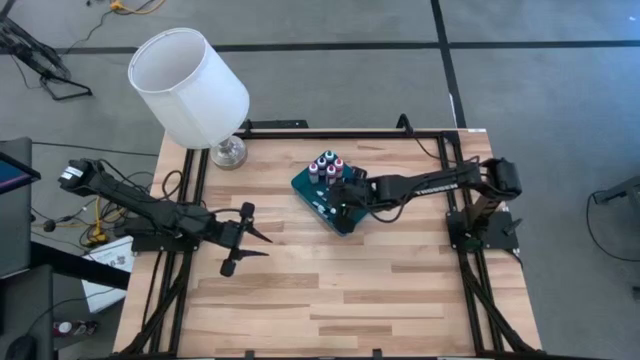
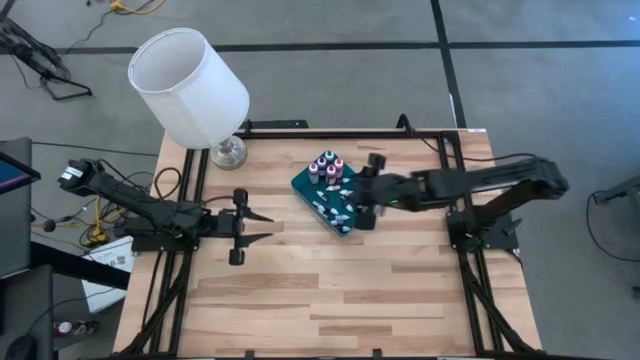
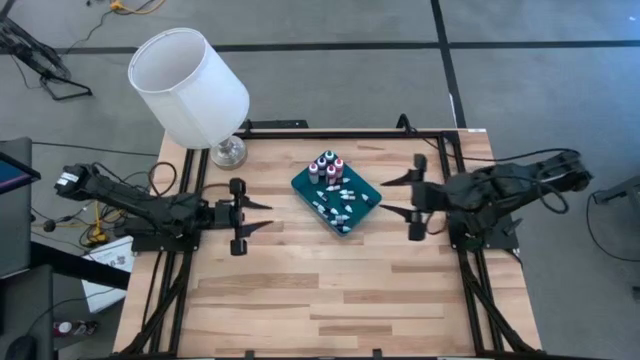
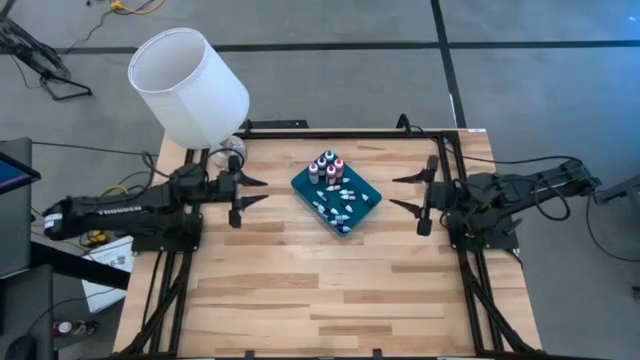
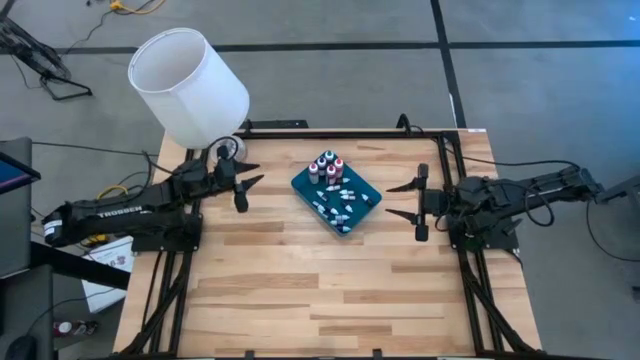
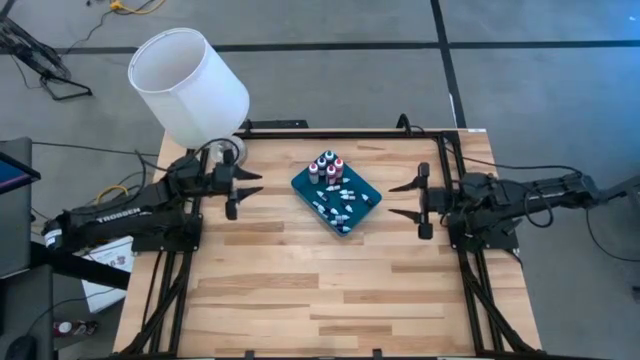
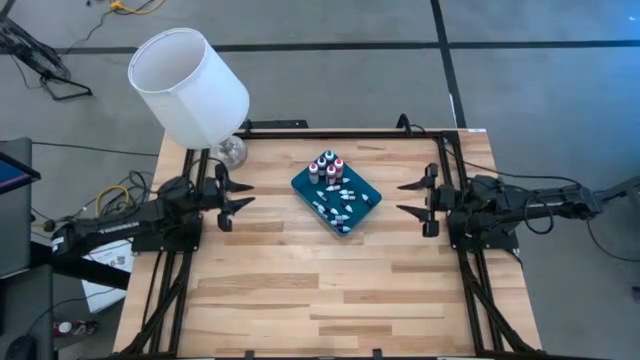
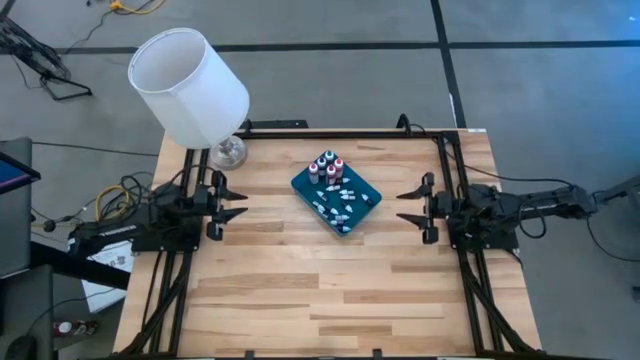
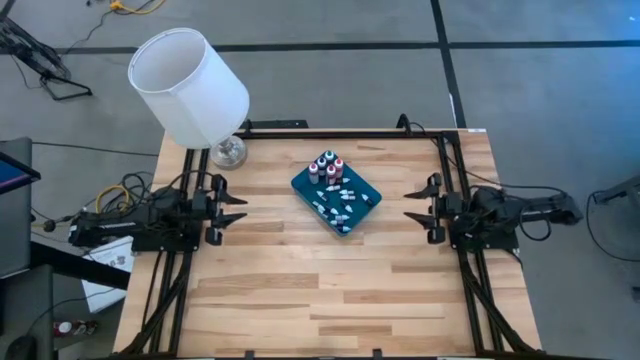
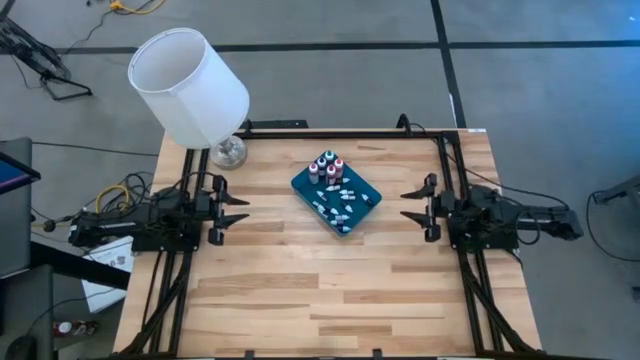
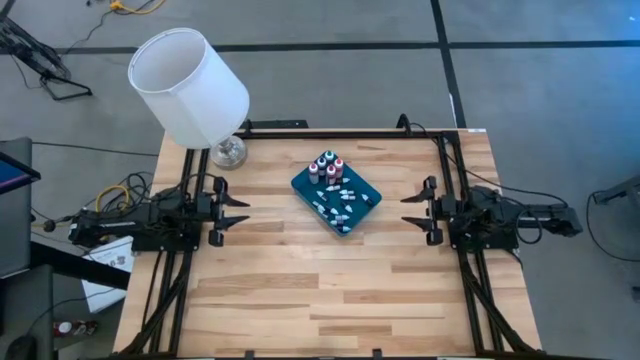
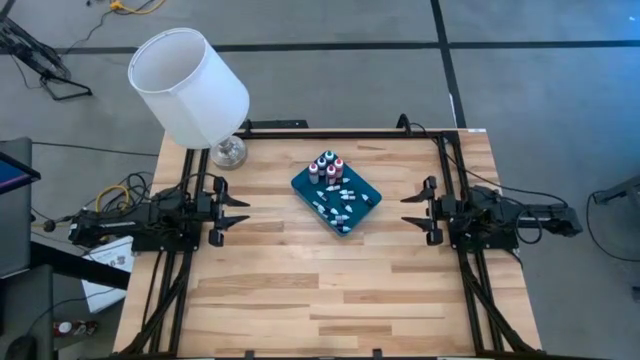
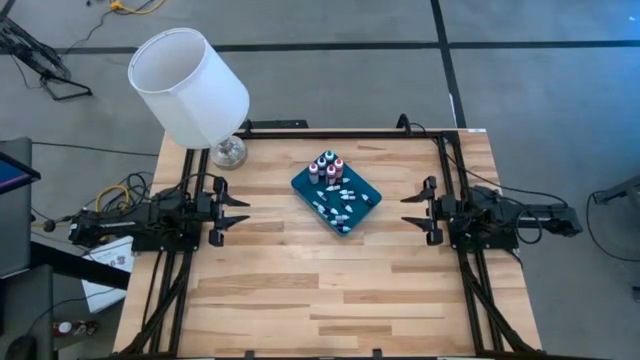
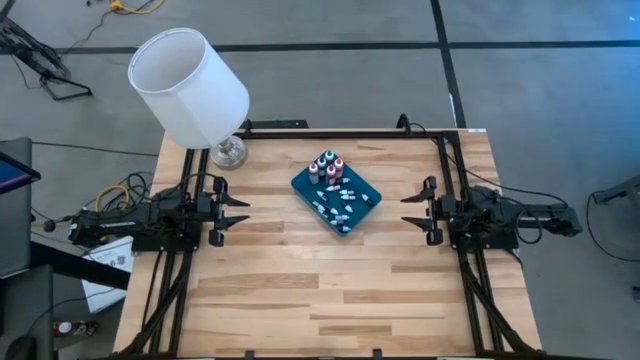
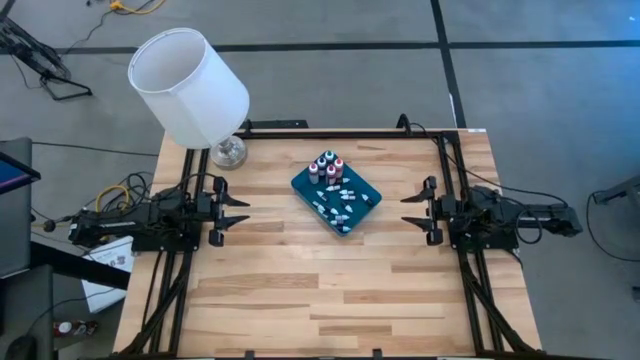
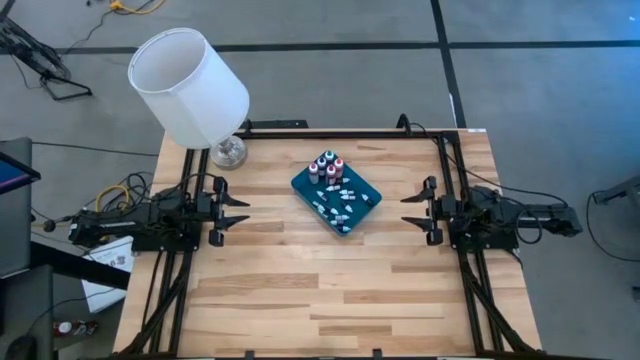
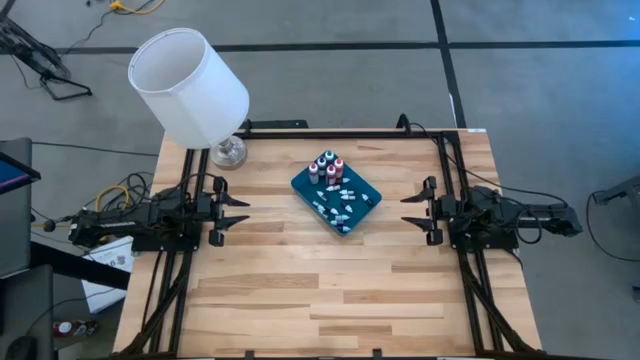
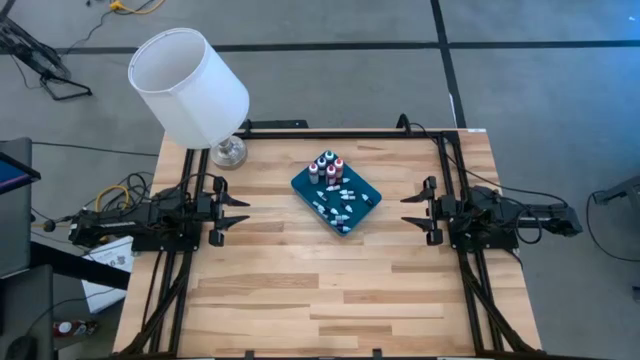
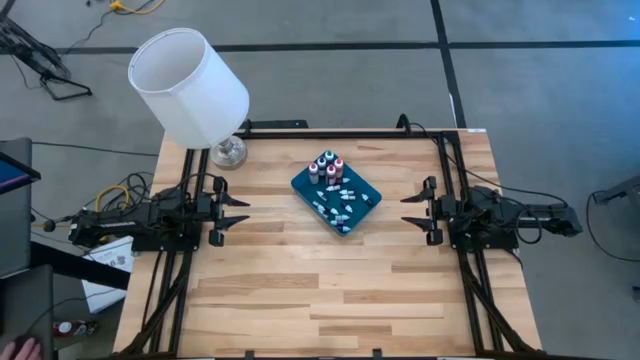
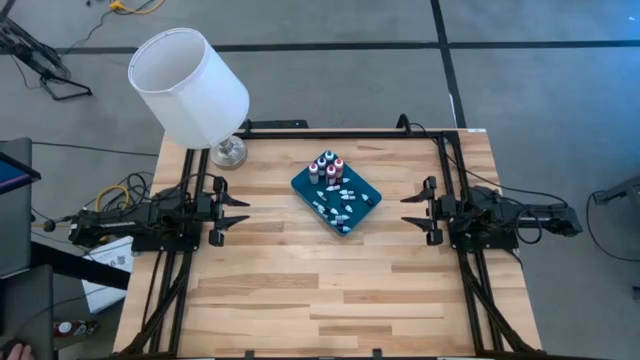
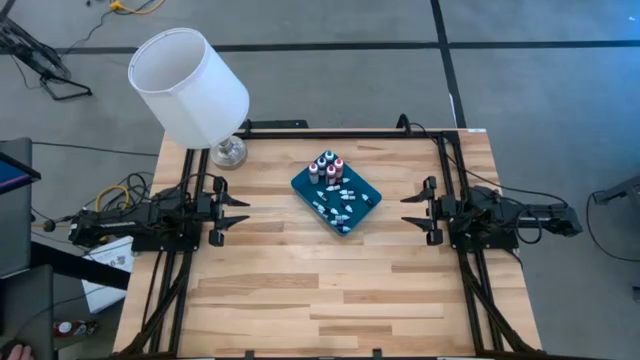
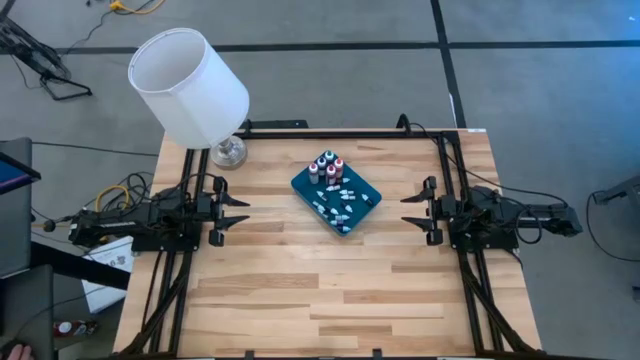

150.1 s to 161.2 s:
Task: Pick & Place food coloring
Return to Home Position

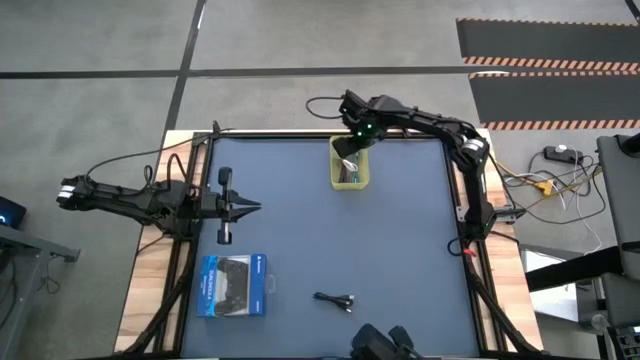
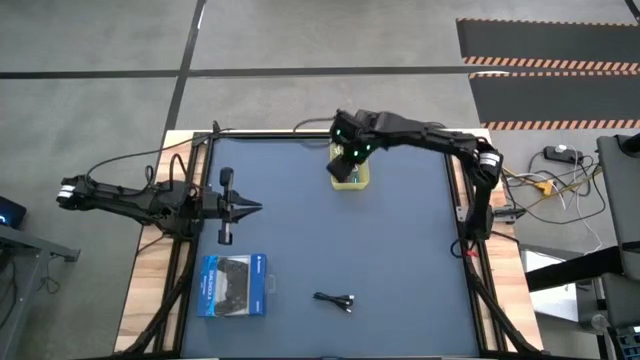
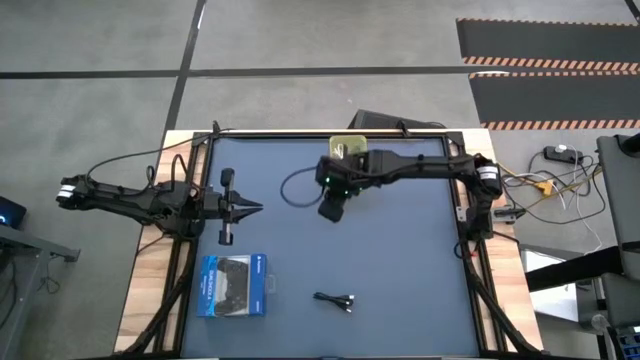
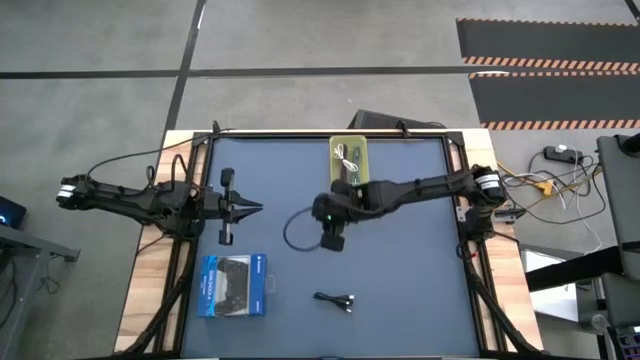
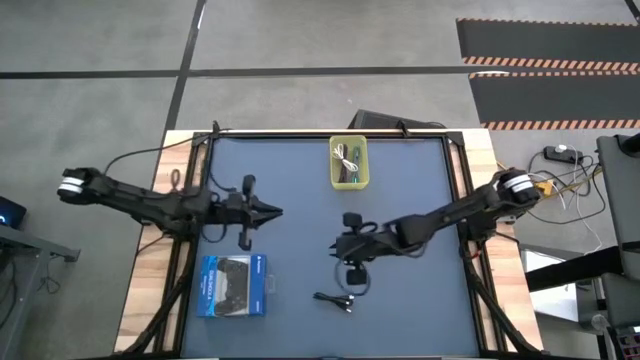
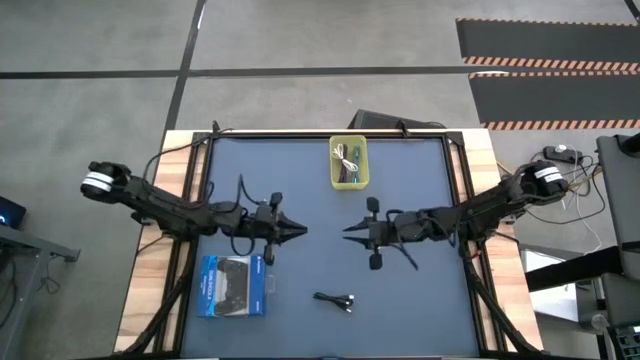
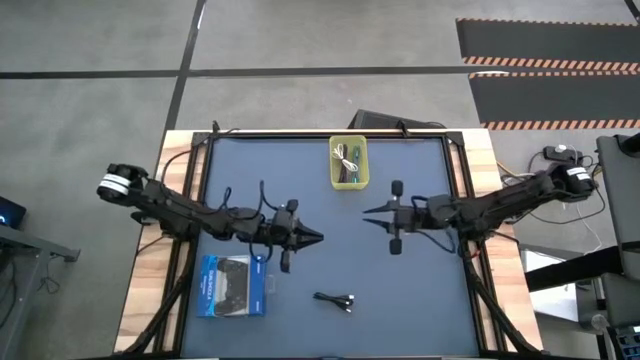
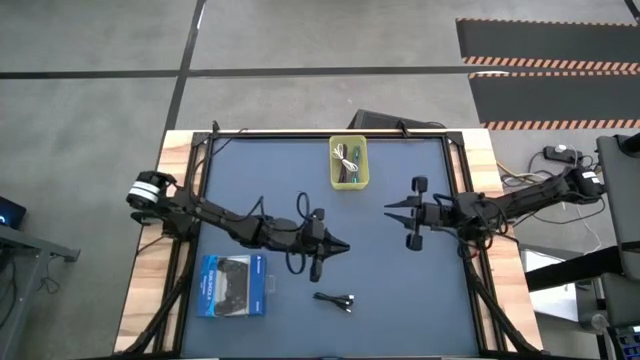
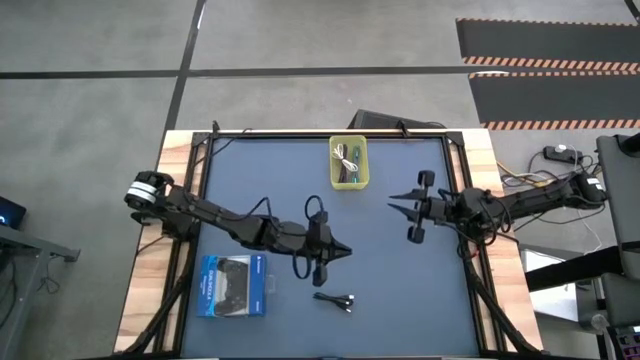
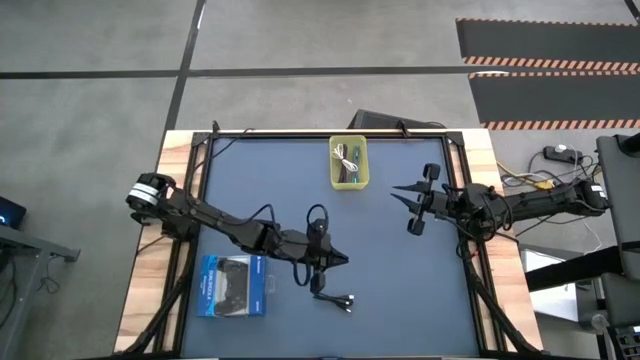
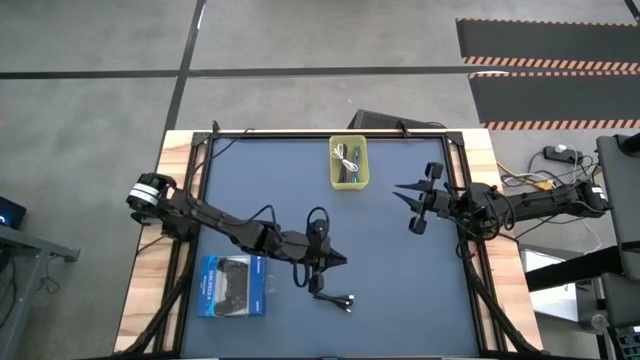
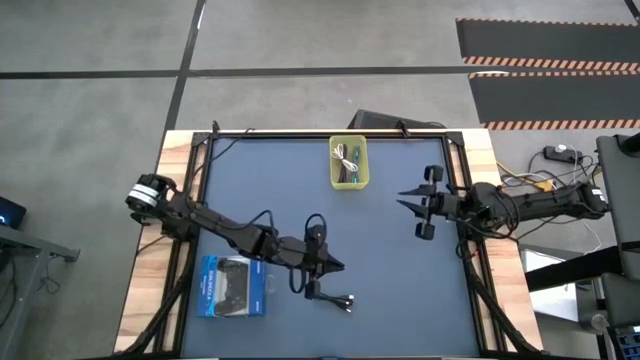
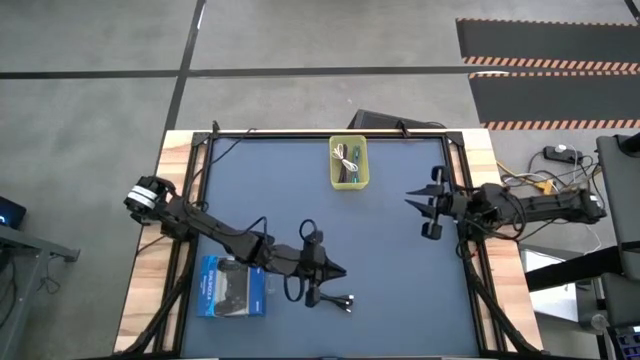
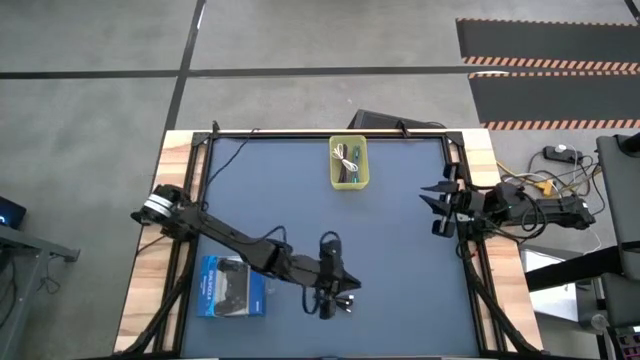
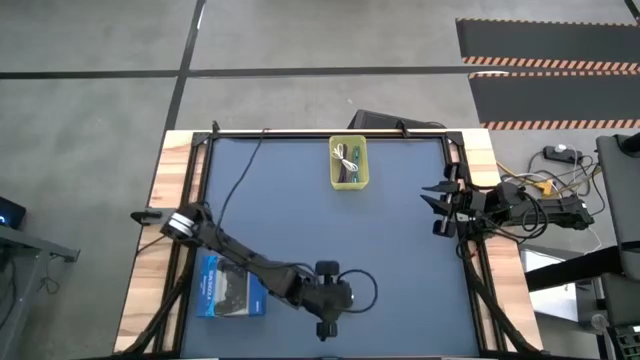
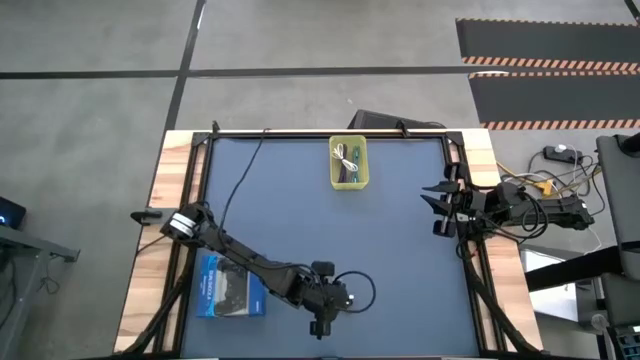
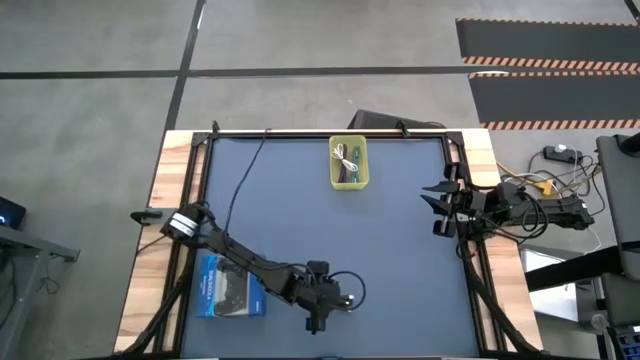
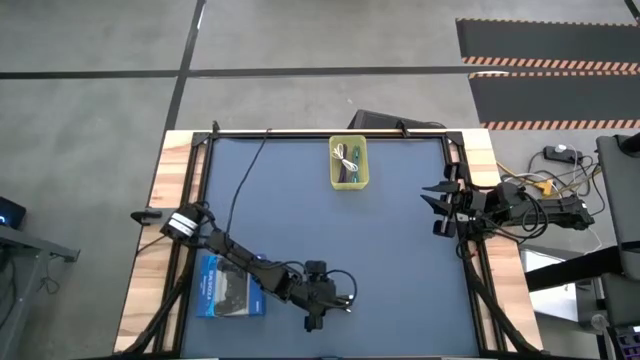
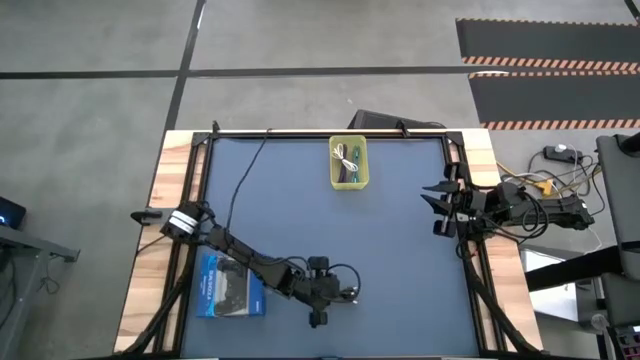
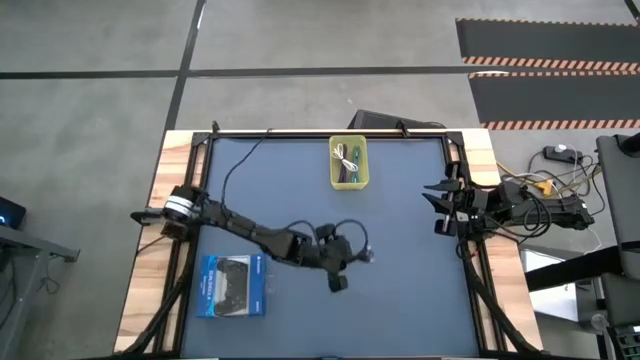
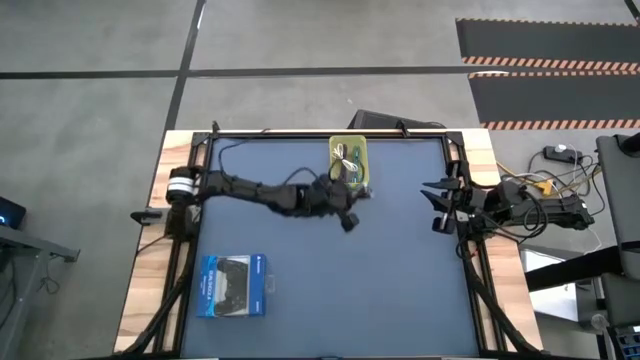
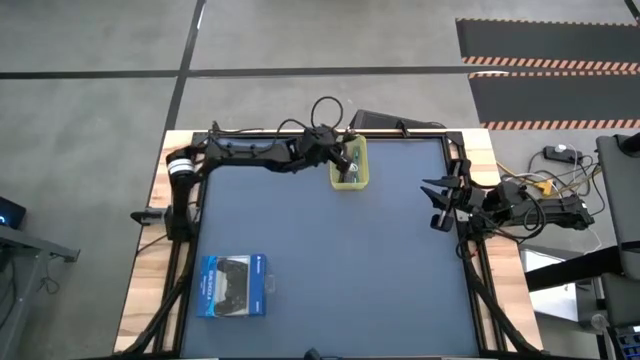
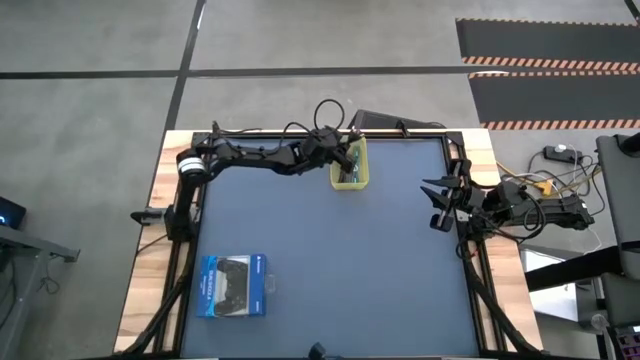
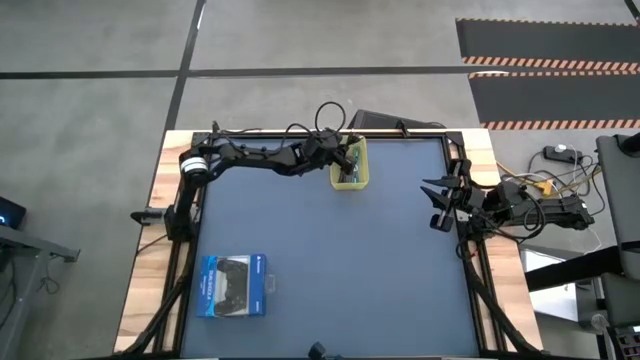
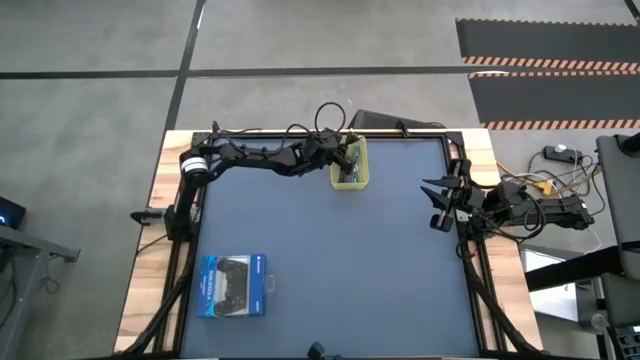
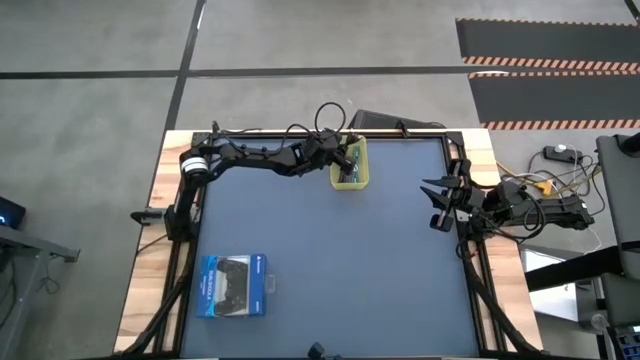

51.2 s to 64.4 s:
Task: Pick and place USB-C Cables
Put the black charger cable into the yellow bin
